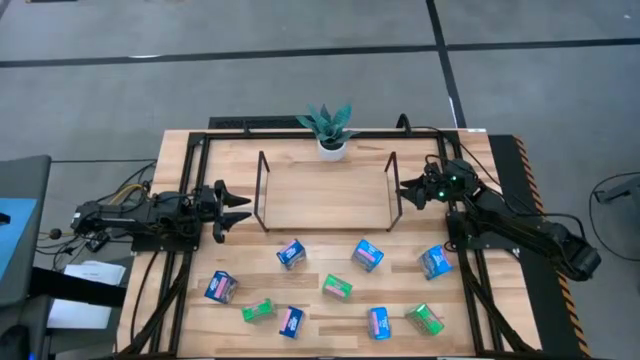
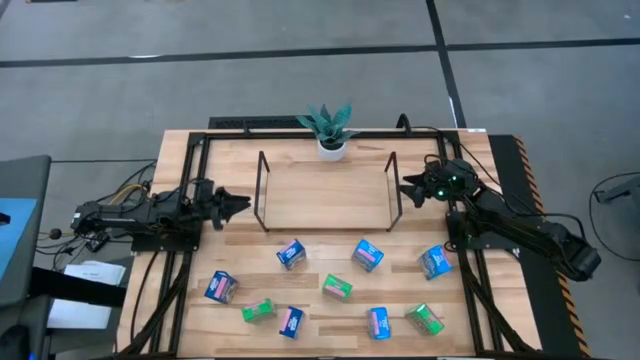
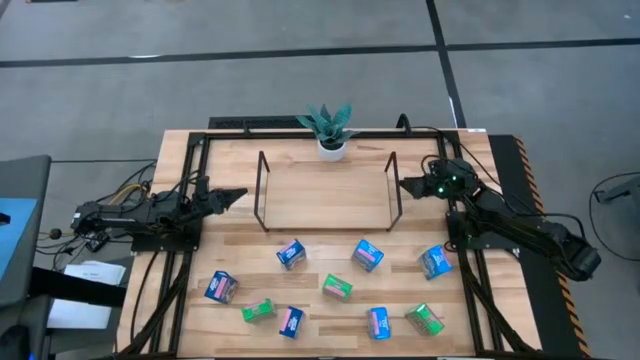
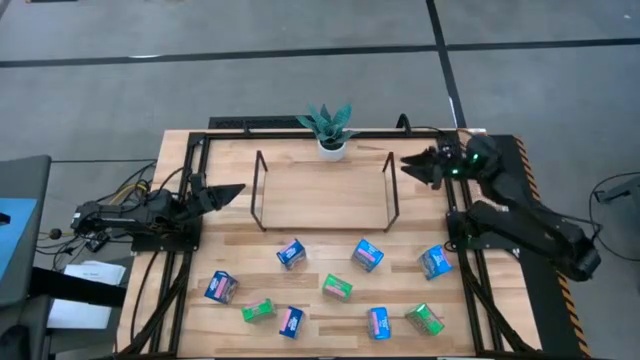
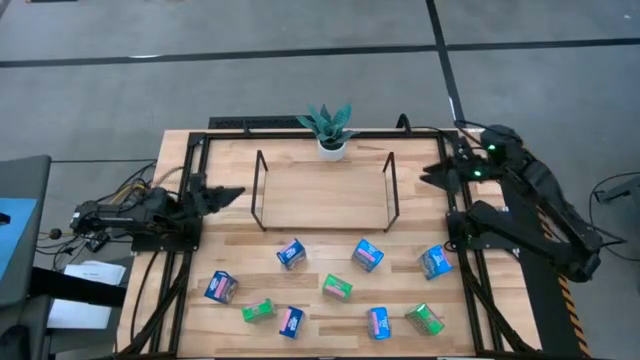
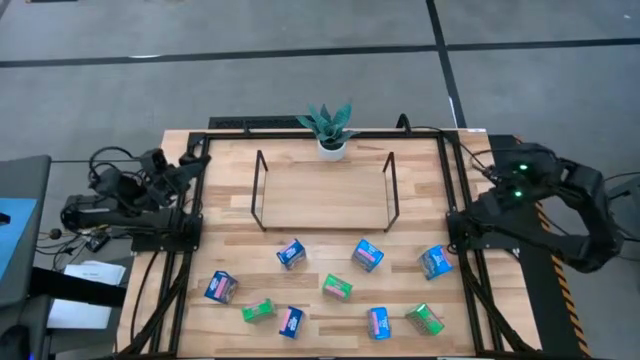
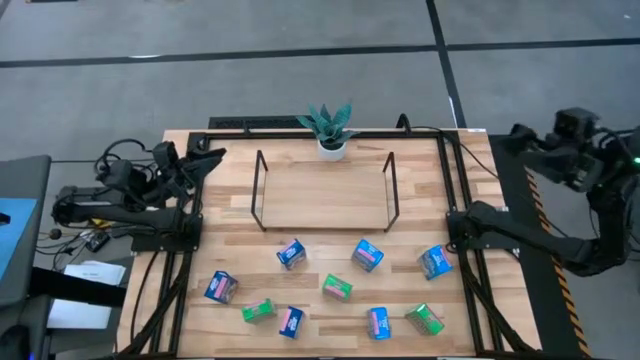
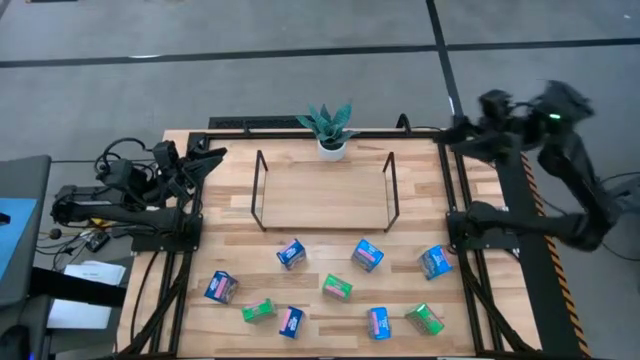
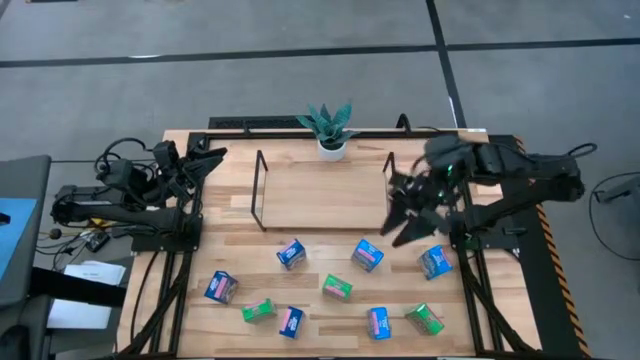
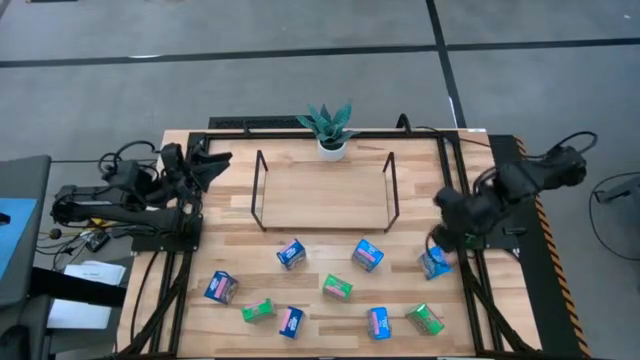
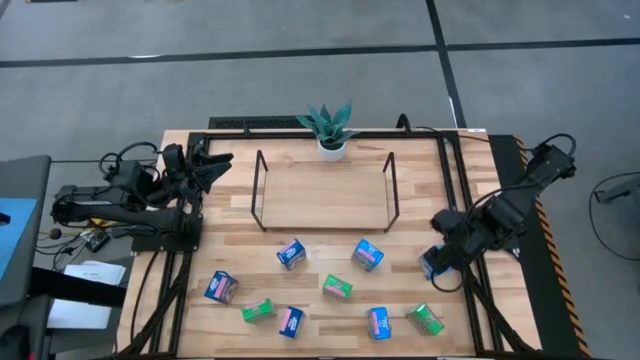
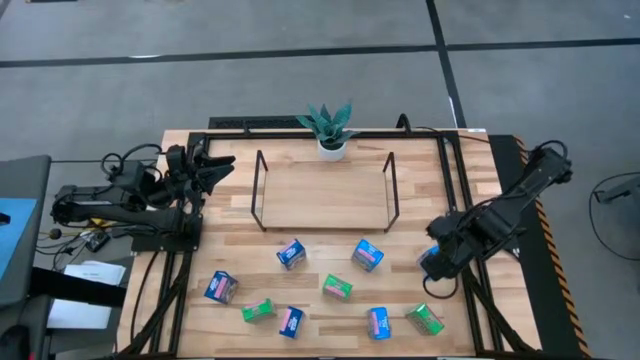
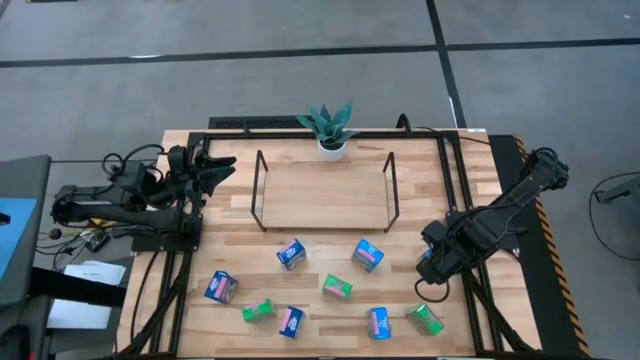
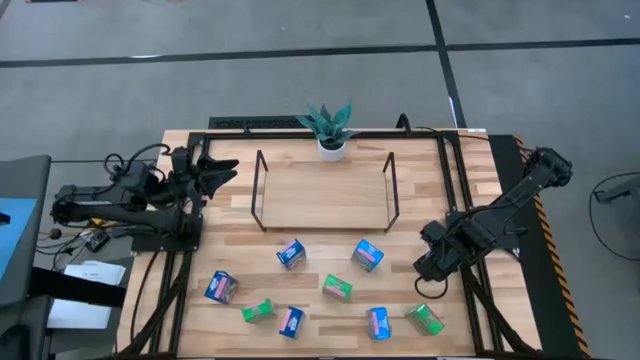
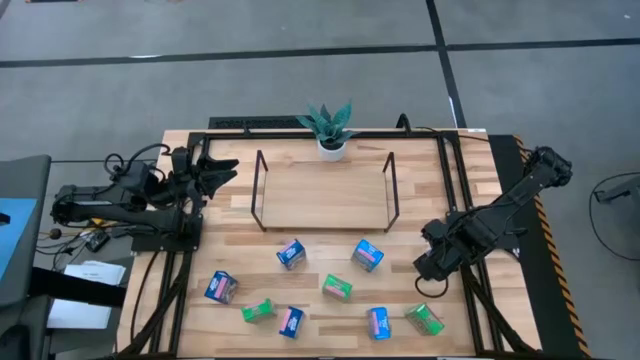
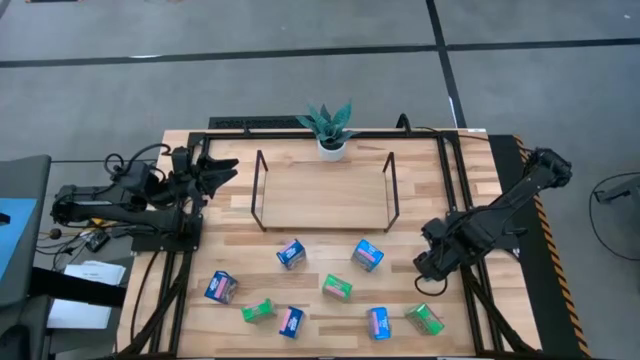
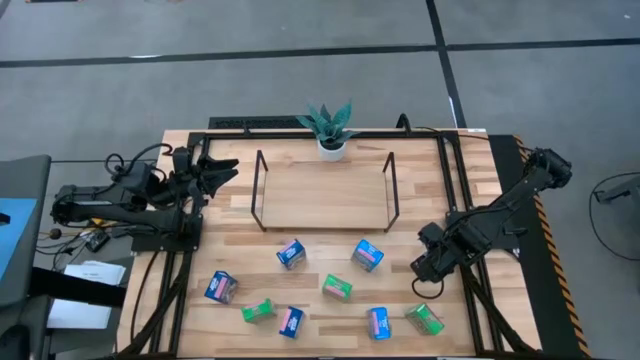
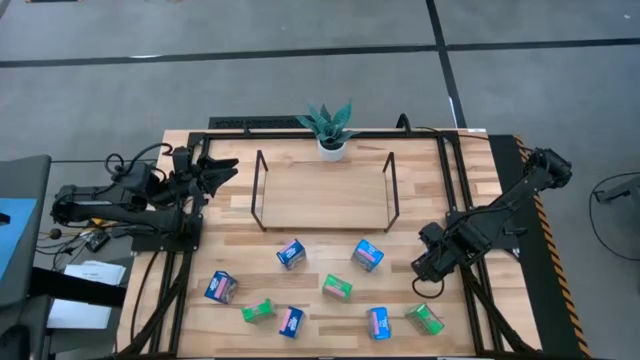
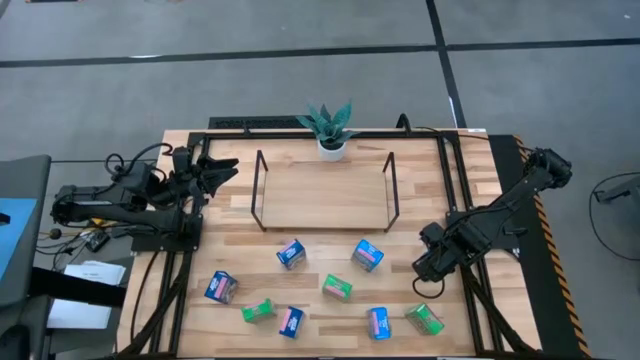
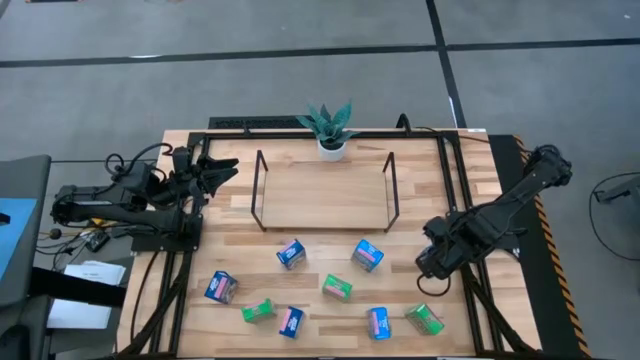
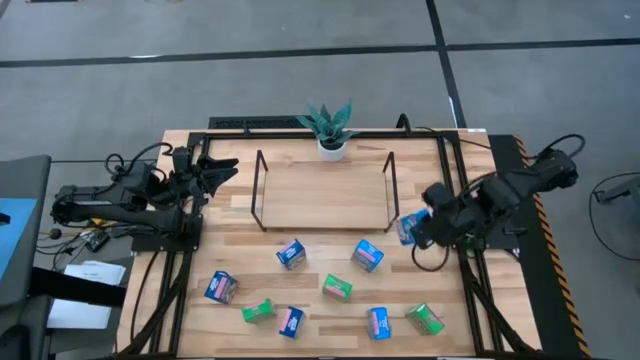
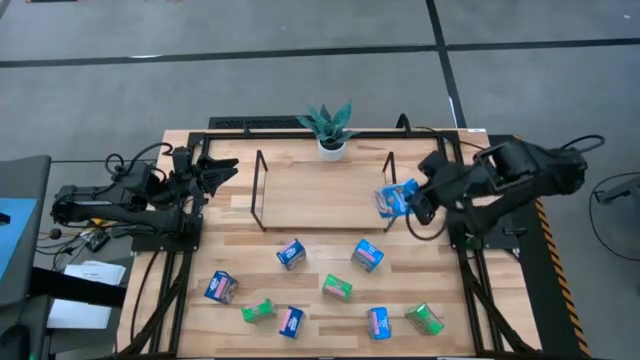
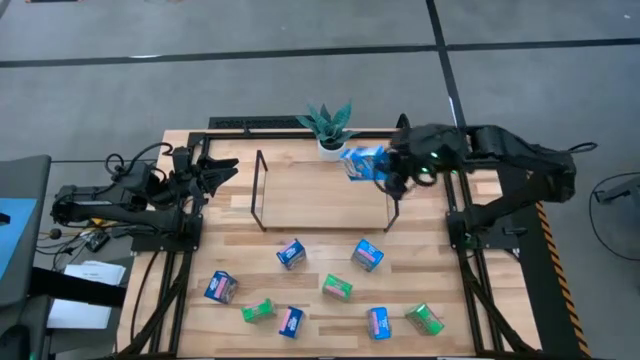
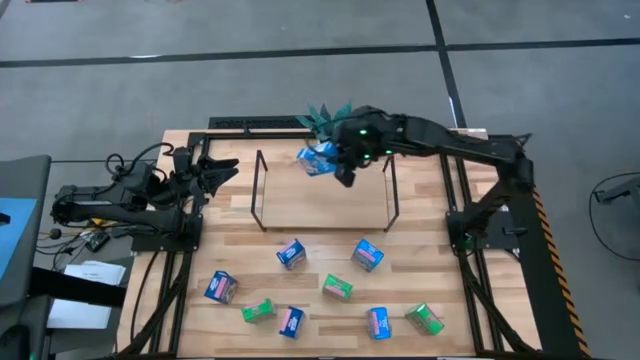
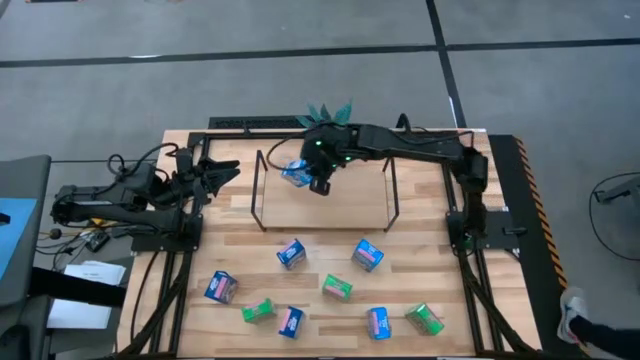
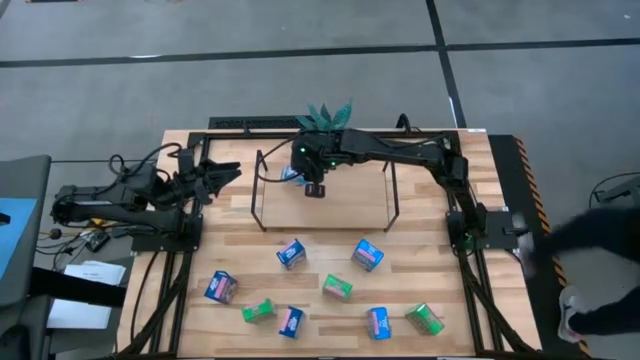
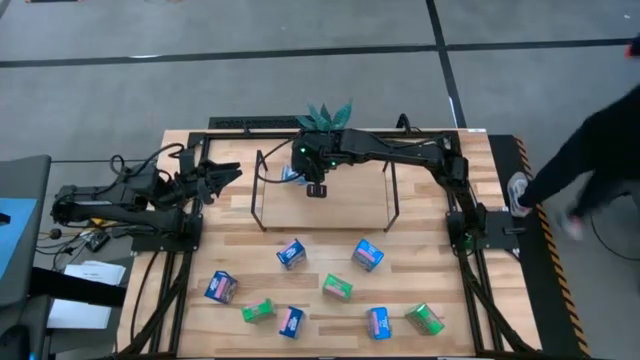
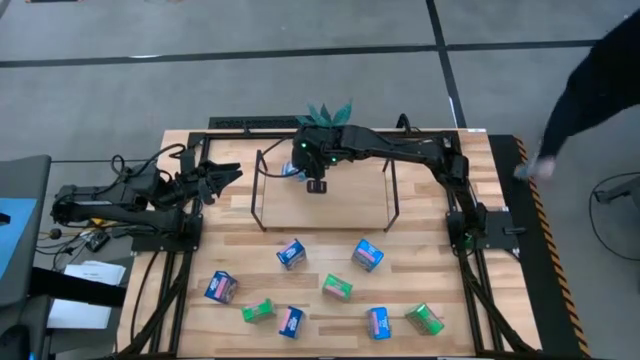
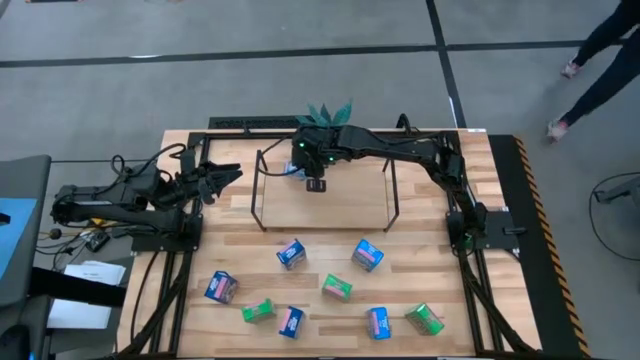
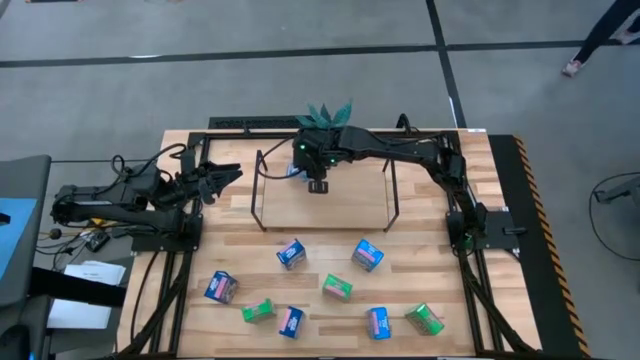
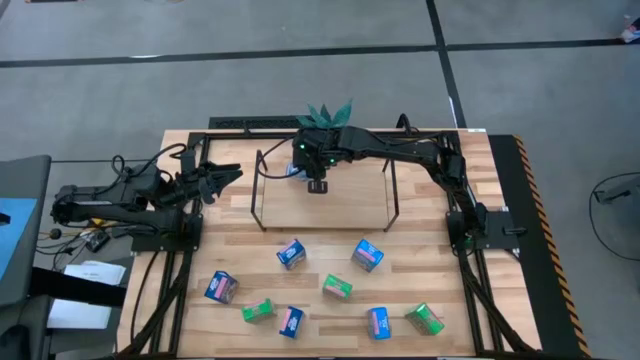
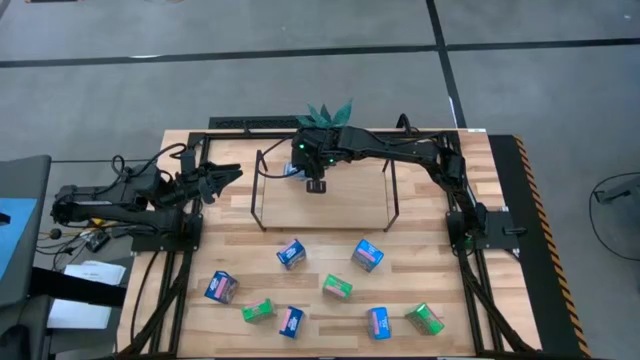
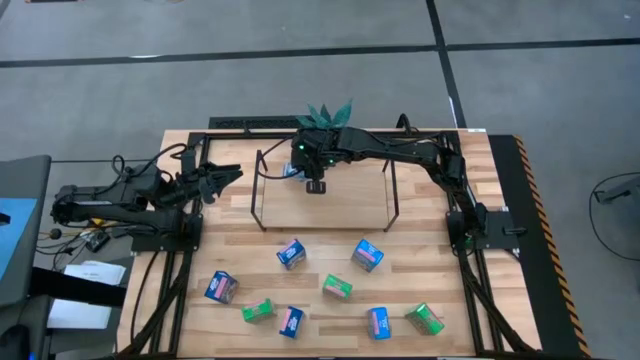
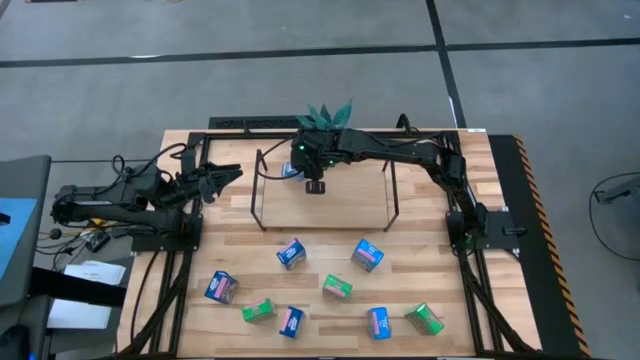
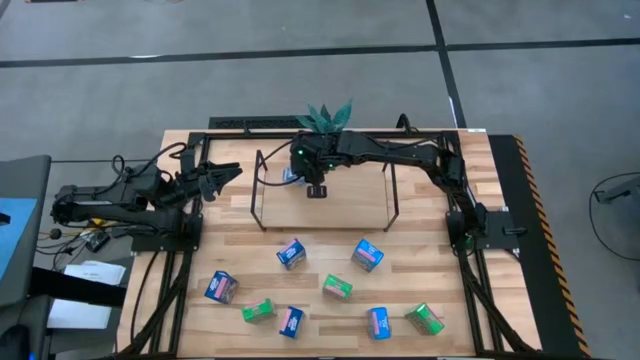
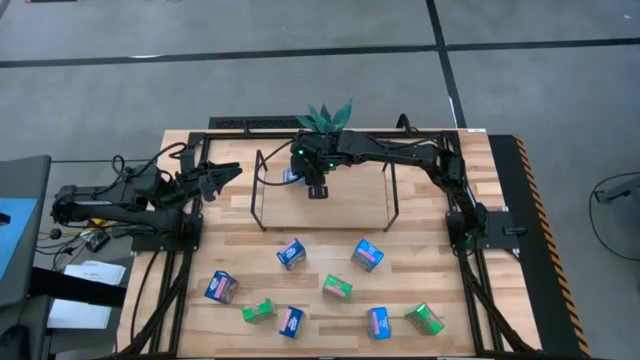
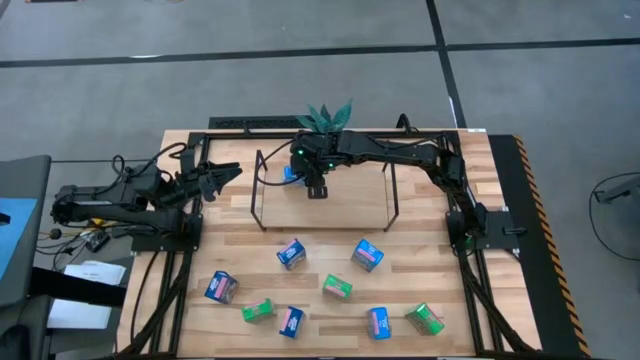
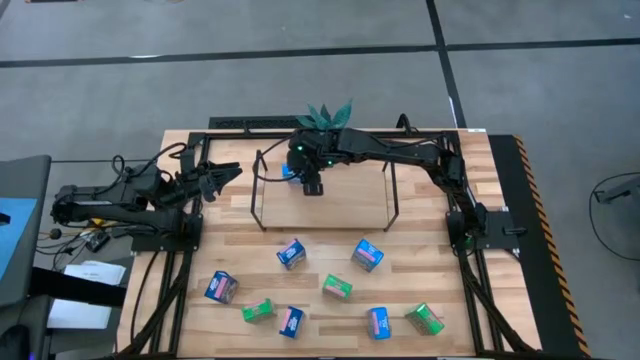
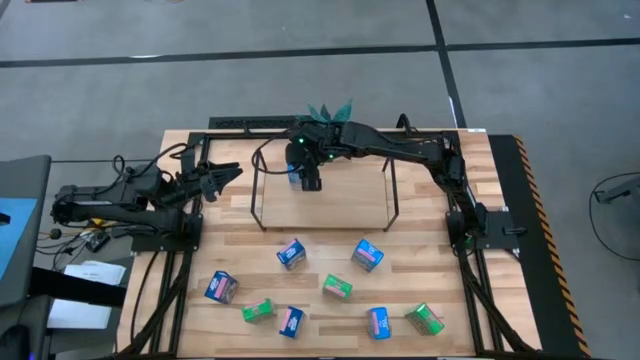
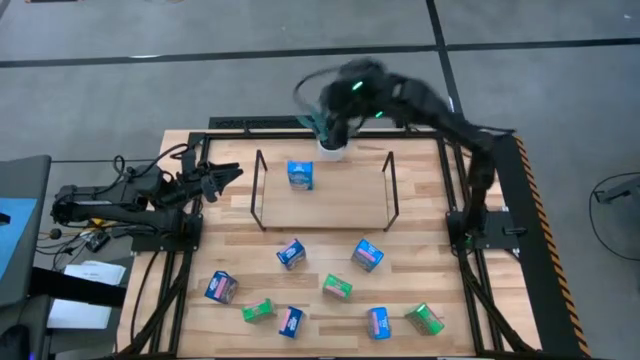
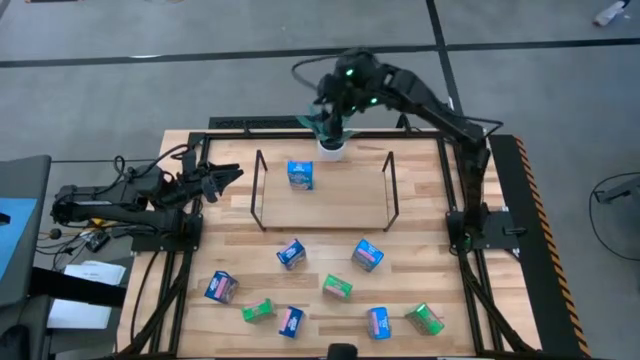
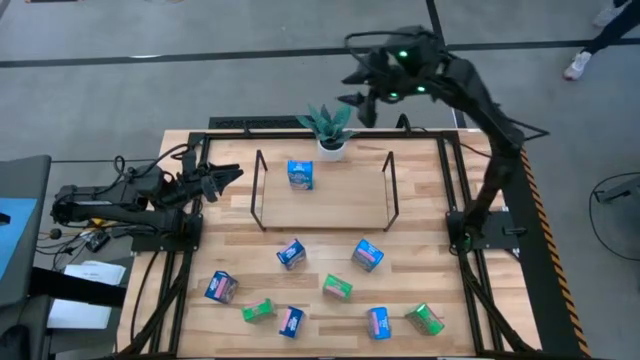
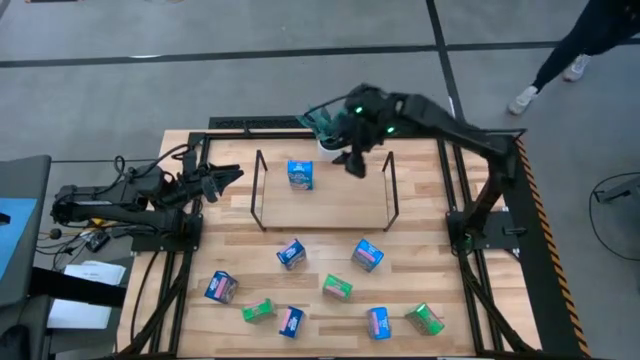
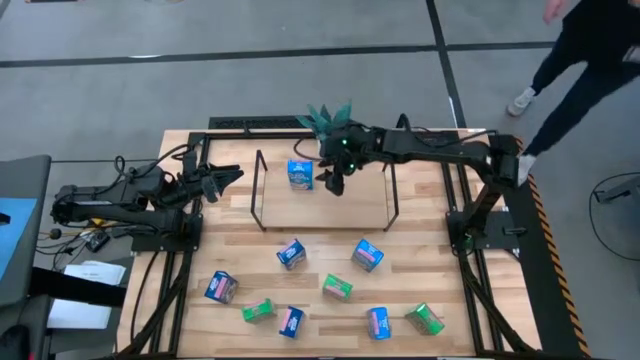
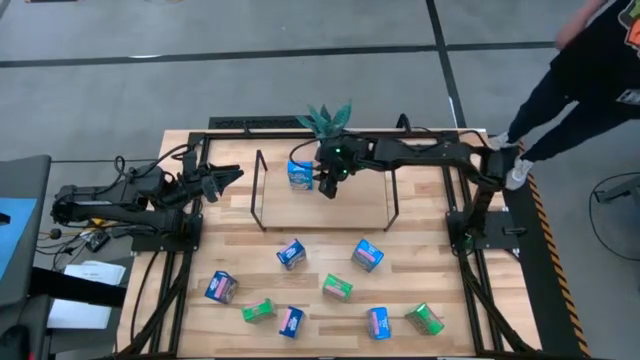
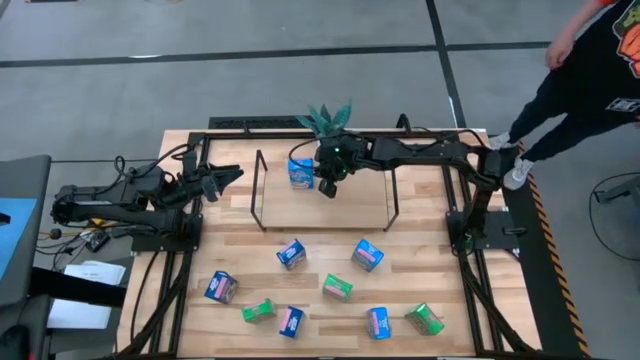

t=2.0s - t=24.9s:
Task: Stack cereal on shelf
Put the top right light blue cereal box on the shelf
